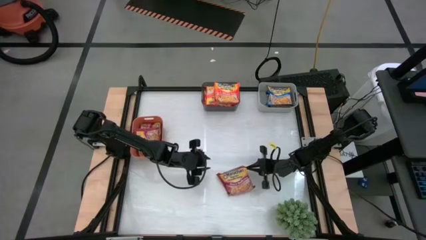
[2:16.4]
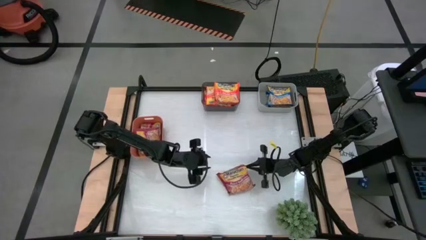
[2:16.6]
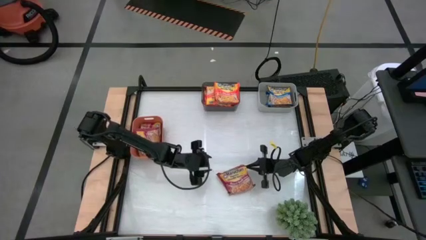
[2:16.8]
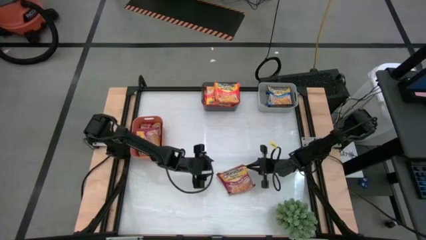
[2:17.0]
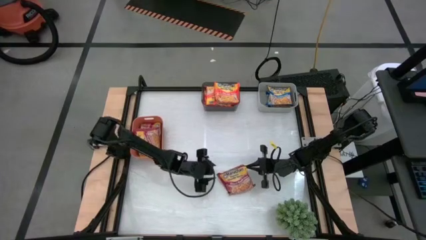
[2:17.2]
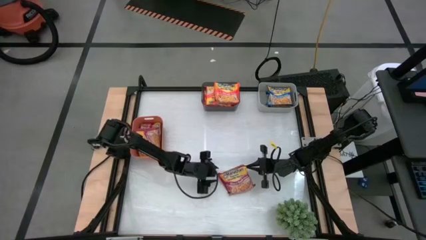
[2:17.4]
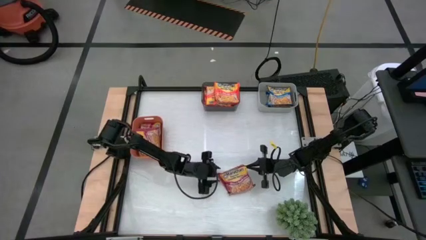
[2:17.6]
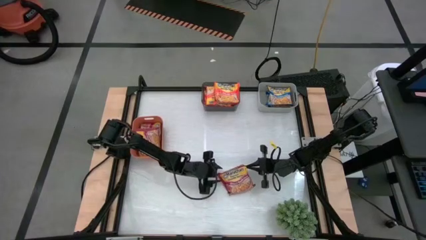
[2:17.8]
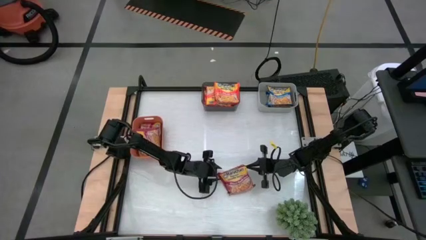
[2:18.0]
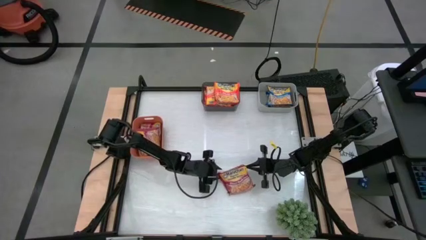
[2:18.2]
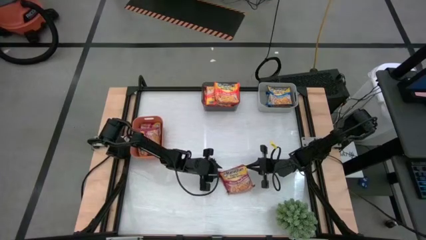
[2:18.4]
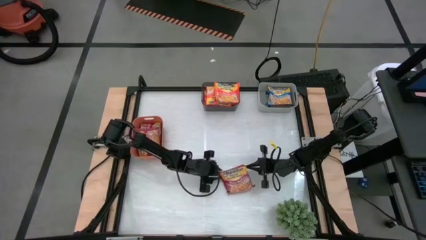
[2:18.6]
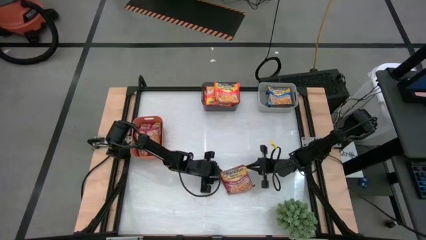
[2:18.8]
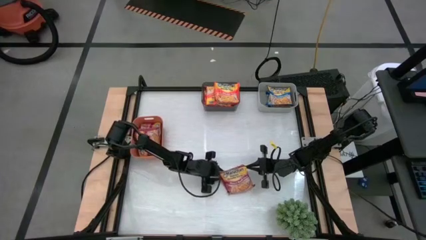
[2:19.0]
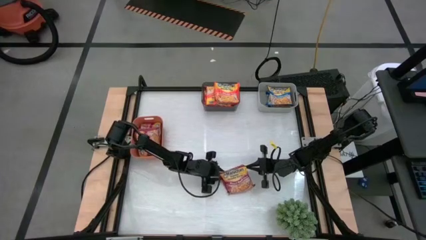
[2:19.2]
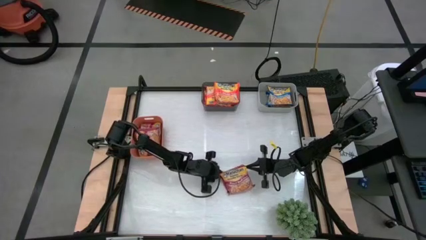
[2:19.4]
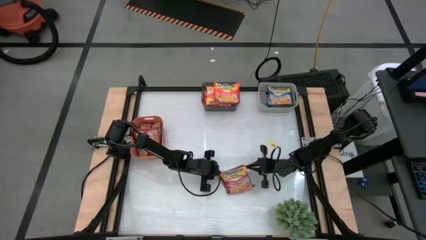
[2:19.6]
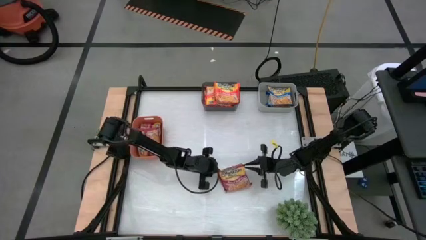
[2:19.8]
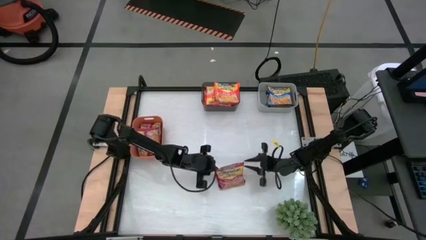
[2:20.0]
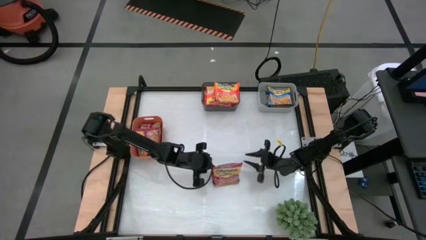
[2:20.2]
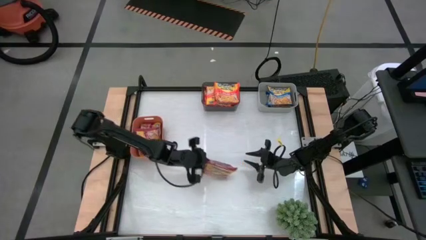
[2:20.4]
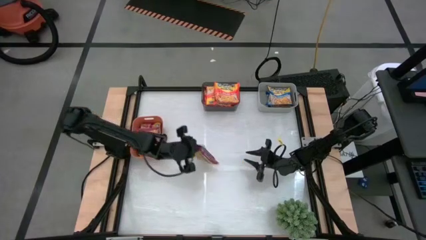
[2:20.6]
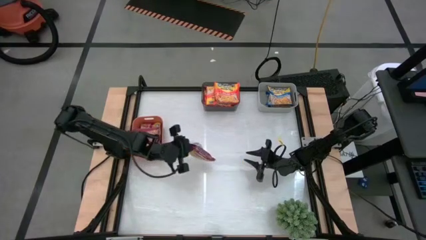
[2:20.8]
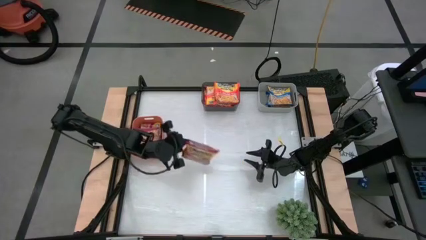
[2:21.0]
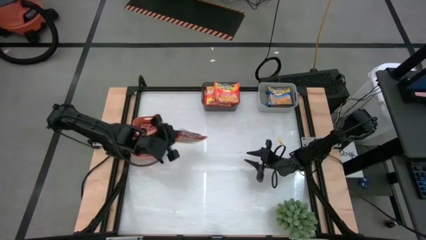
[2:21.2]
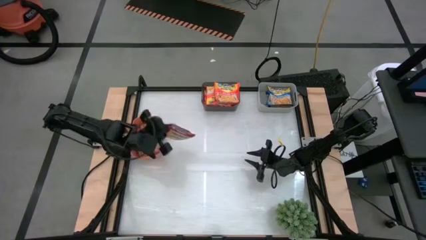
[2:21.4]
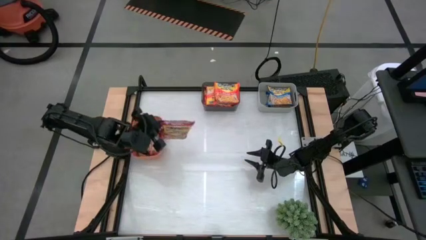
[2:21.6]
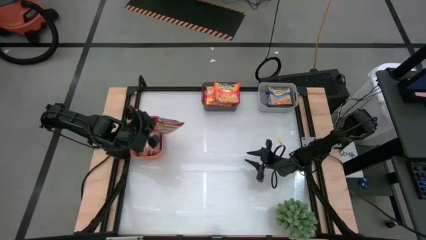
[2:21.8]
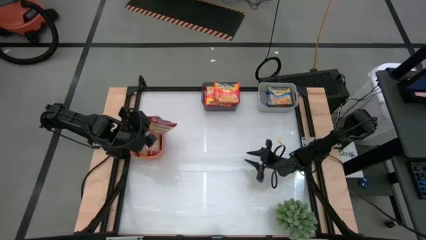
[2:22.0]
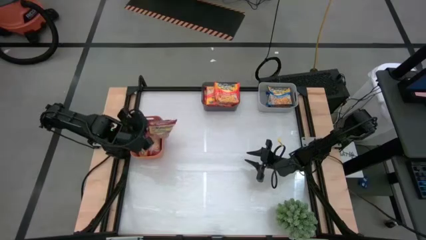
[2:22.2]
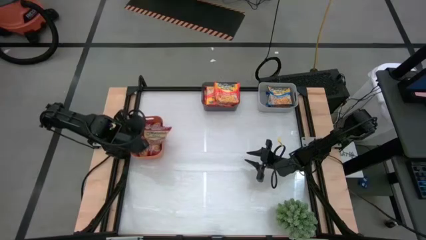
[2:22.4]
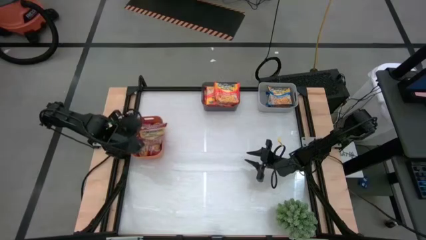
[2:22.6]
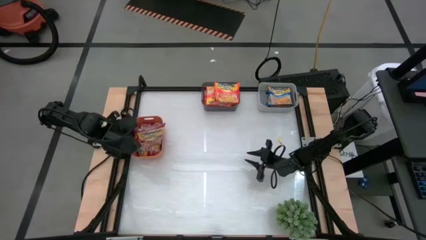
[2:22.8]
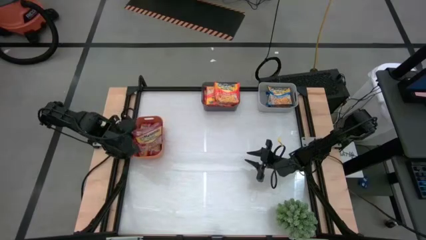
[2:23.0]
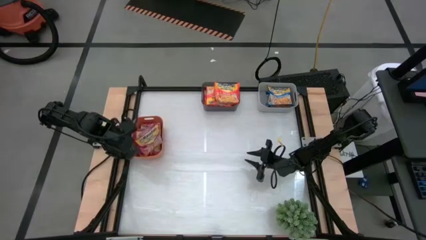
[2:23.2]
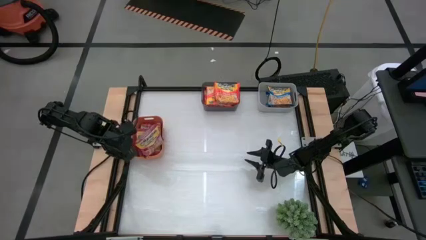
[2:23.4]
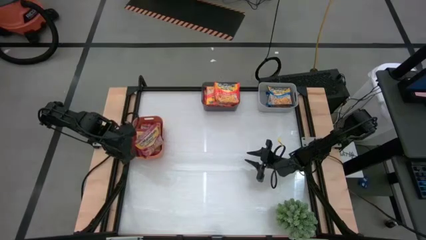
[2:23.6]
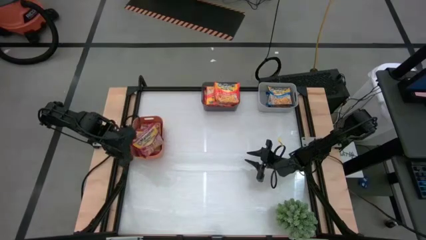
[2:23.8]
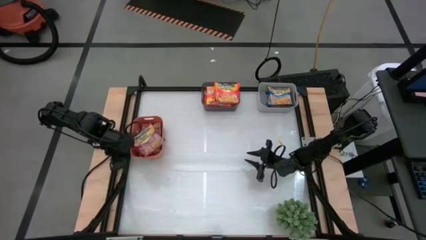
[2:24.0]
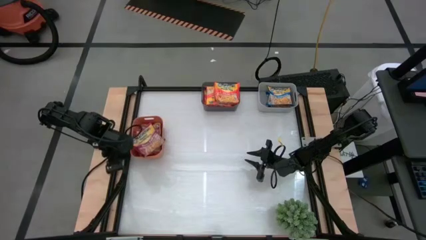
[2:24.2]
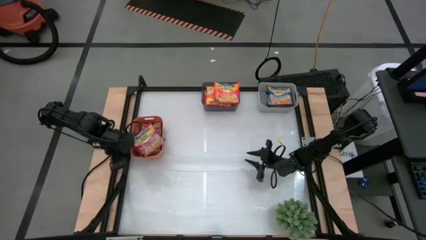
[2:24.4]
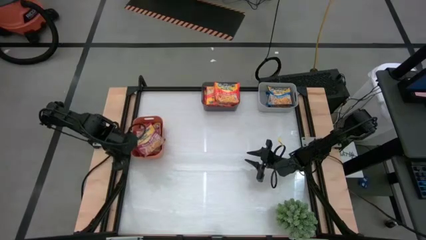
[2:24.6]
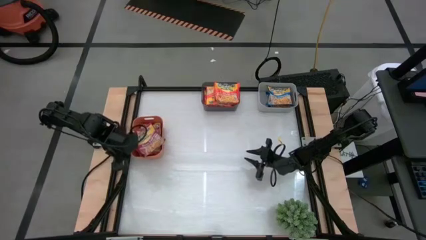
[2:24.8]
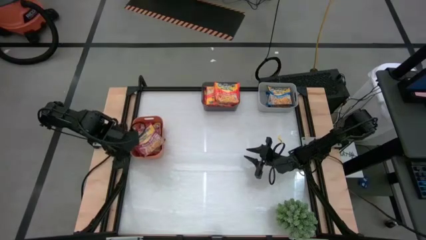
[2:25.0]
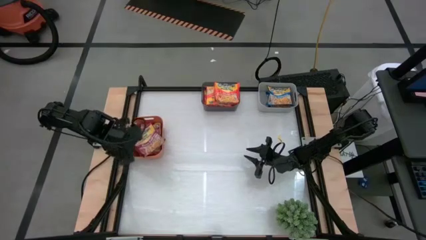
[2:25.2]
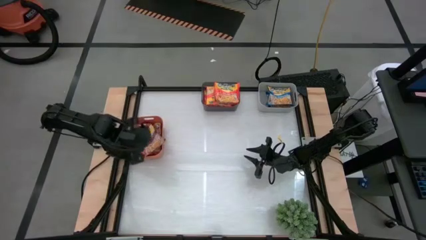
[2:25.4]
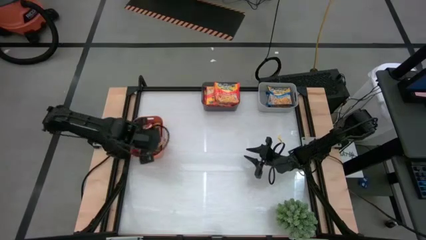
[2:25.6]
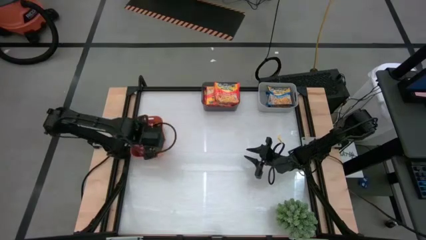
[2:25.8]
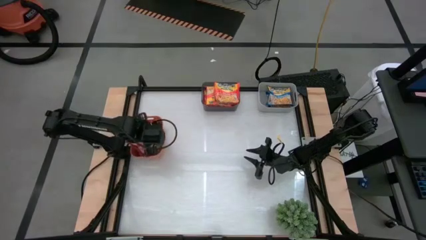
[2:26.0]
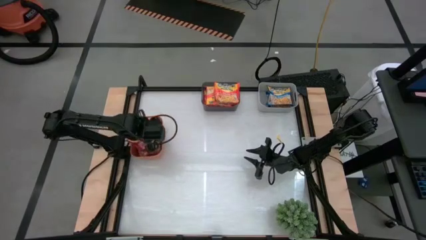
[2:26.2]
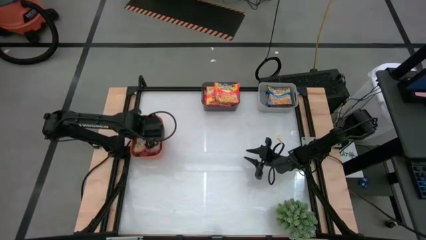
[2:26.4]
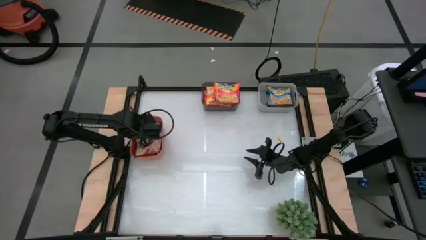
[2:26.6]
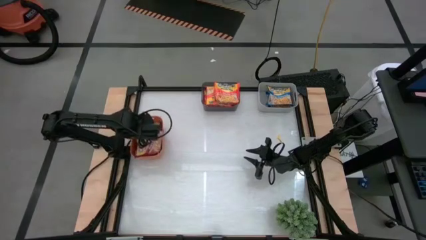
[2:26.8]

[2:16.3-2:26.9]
Task: Sort Maruchan noodles
Put the red noodle pack into the orange bin

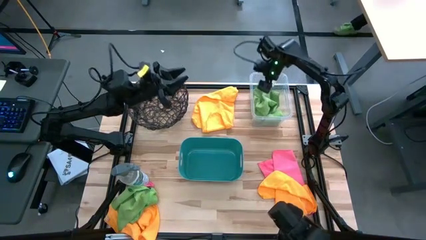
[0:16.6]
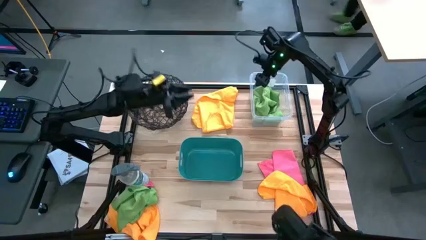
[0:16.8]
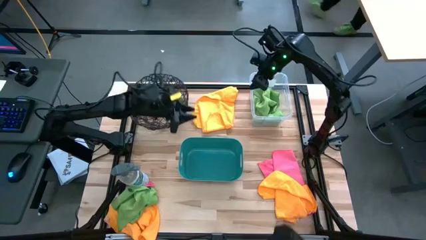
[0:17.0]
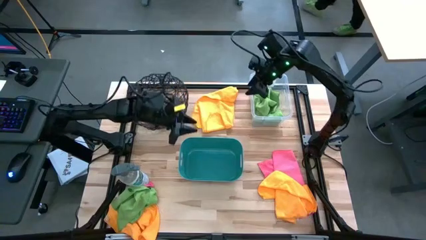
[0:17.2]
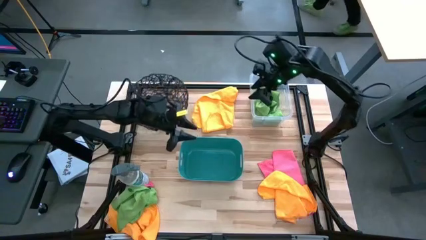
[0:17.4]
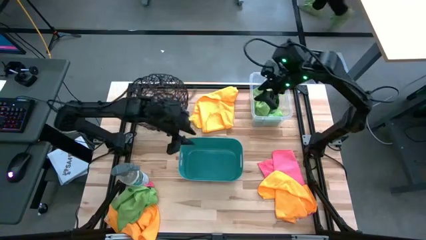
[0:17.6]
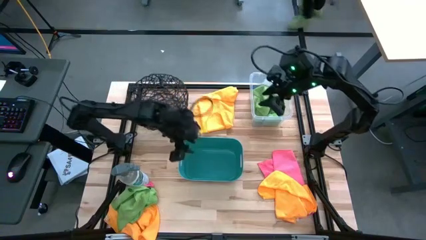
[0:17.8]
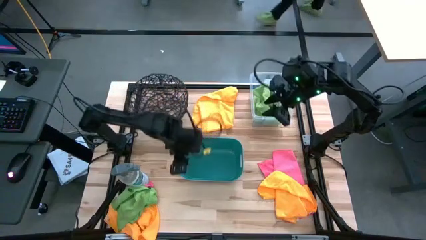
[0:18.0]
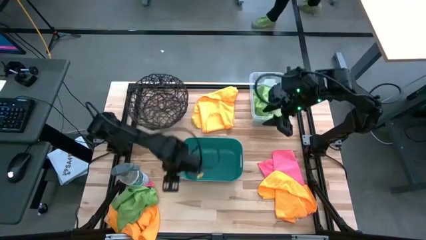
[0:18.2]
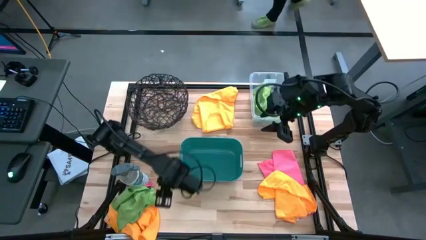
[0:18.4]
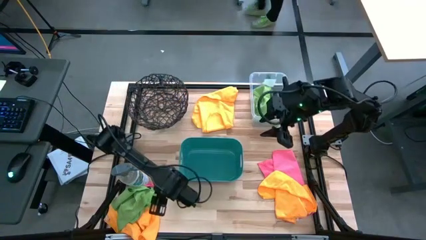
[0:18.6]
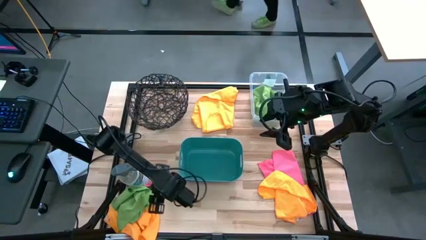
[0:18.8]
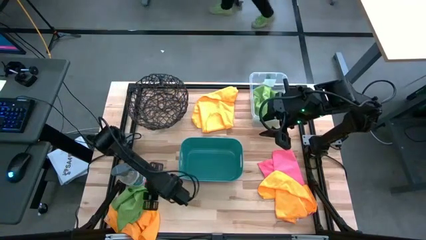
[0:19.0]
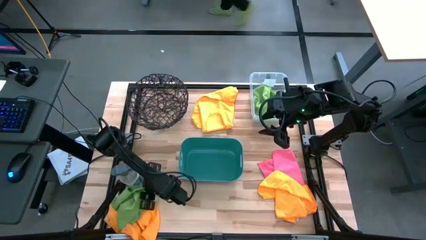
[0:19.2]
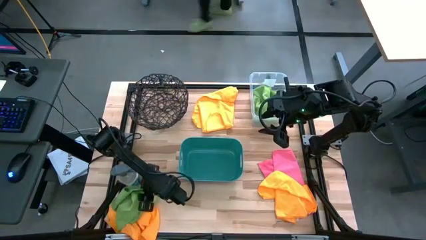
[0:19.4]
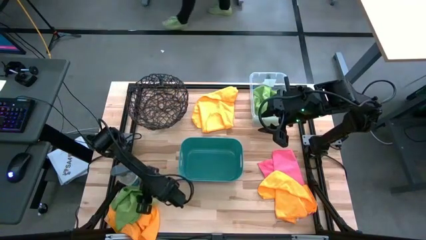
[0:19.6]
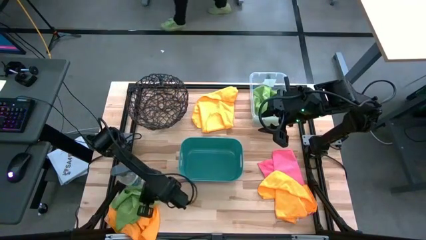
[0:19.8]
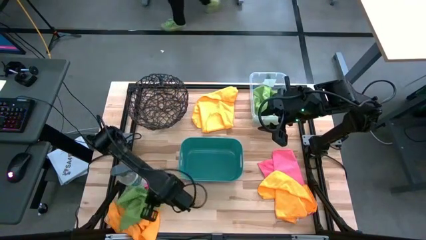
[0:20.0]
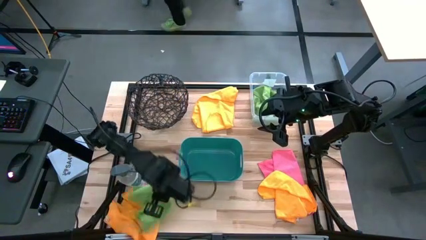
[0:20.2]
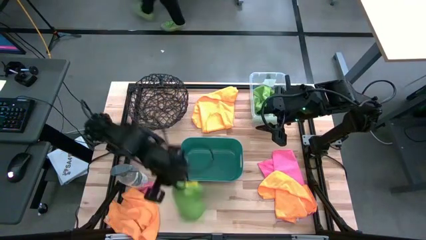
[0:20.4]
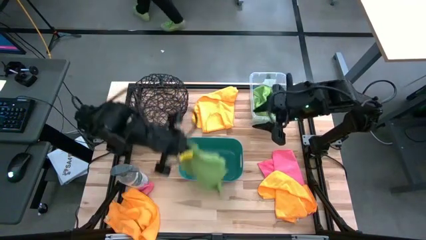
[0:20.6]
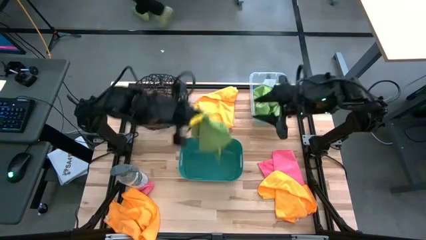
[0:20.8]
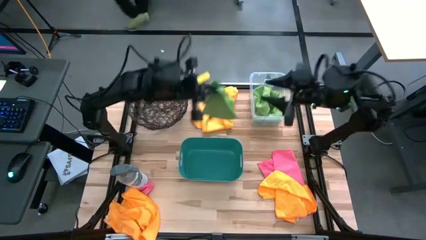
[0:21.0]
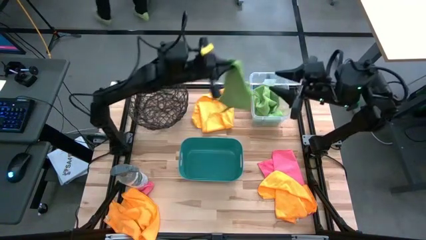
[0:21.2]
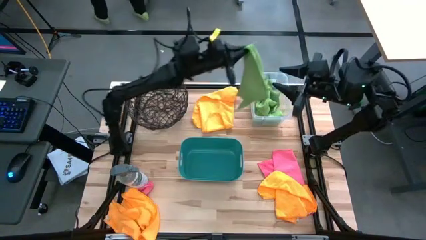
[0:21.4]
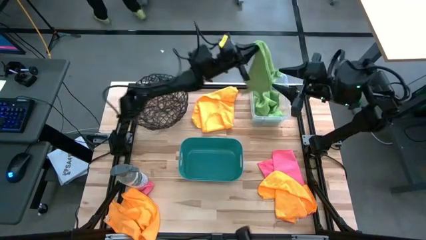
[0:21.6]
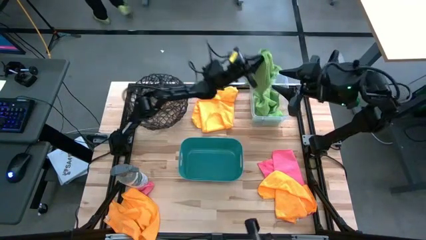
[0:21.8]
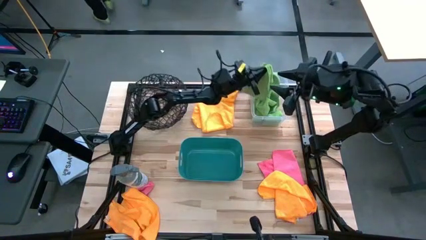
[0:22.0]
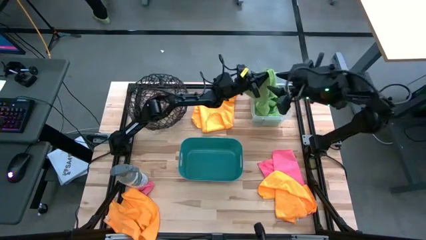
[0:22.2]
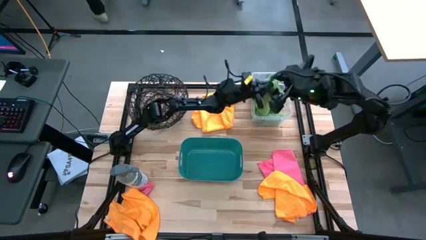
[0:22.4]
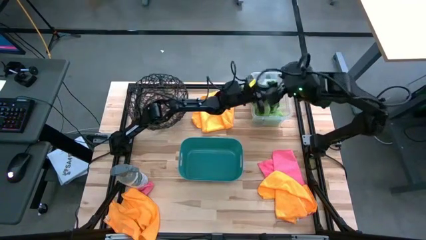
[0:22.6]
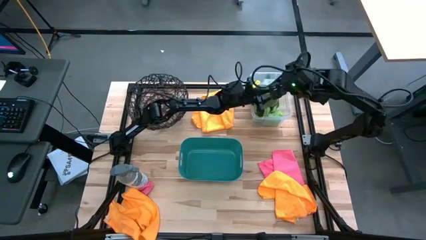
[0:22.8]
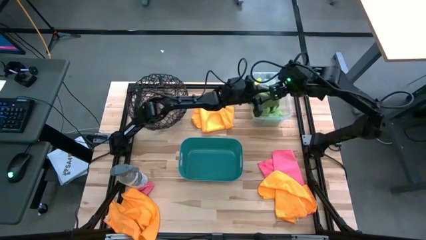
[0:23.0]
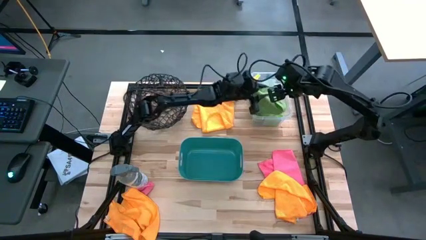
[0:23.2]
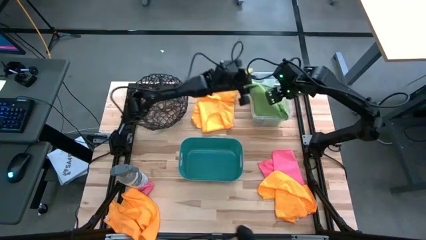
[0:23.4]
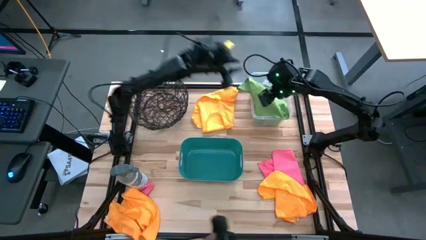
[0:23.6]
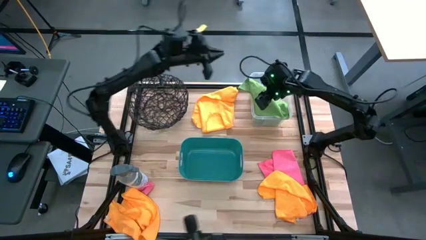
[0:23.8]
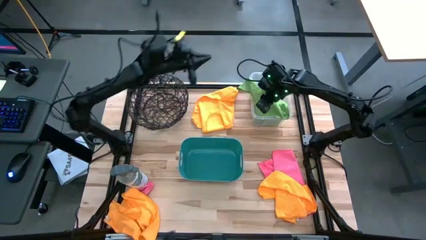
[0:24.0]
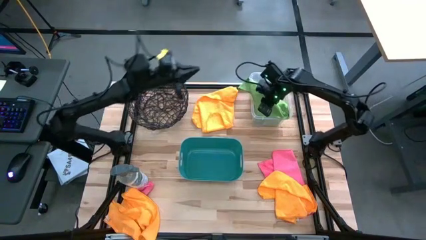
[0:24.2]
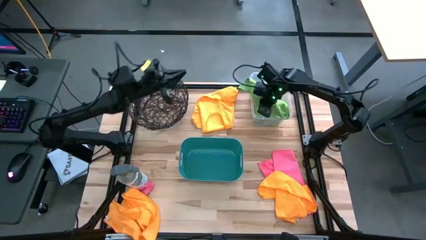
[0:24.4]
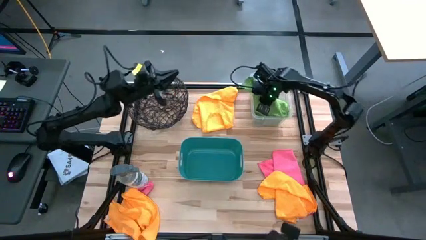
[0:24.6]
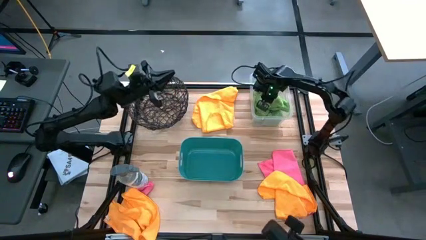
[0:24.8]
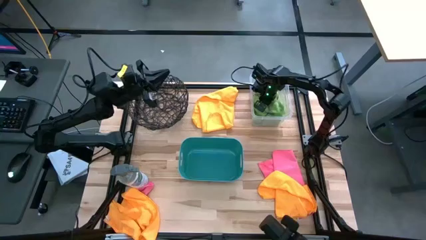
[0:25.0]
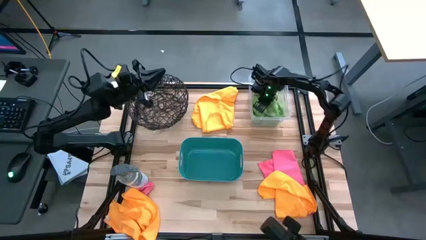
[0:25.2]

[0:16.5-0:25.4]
Task: Sort microfiber towel by color & place in baskets
Put the green microfiber cloth into the transparent bin
